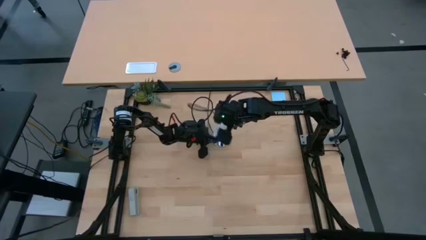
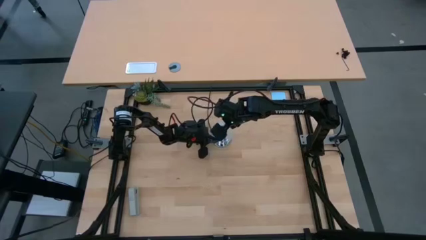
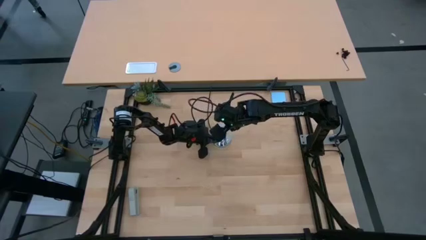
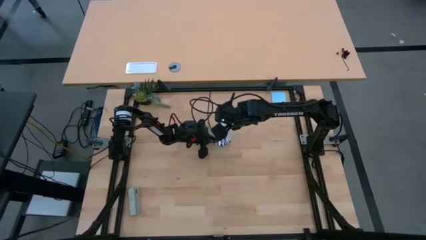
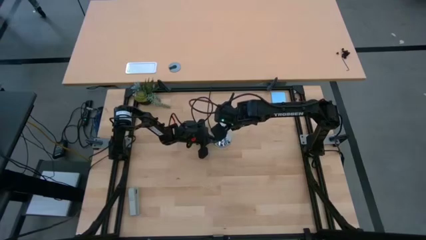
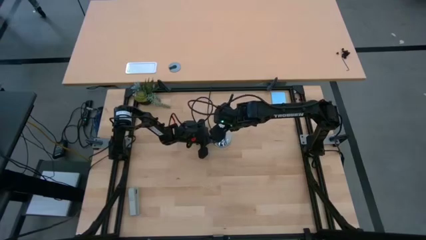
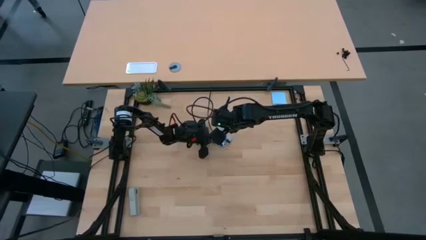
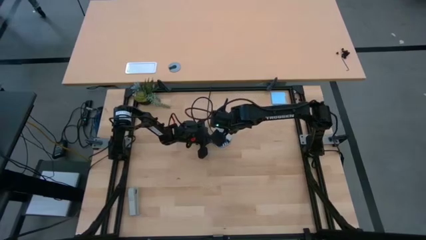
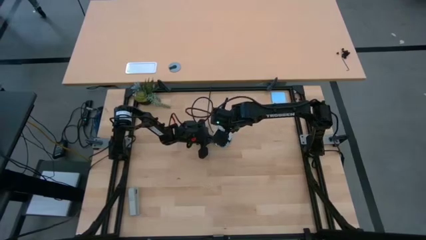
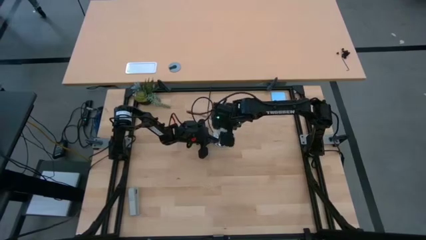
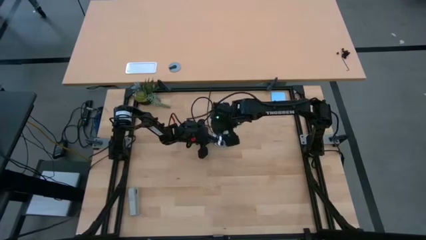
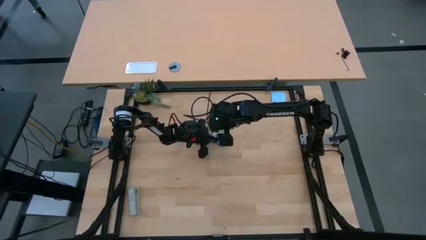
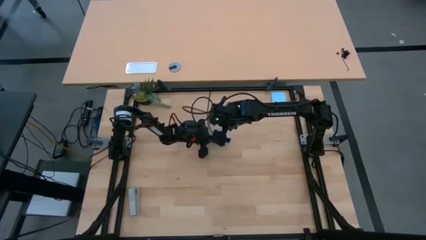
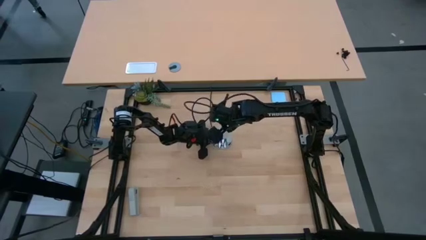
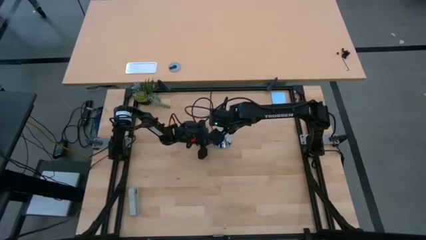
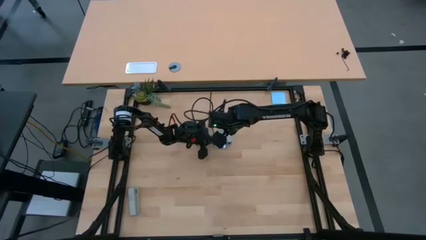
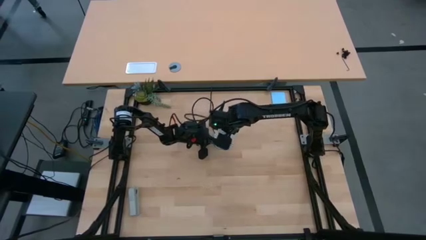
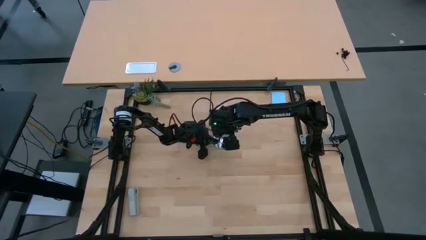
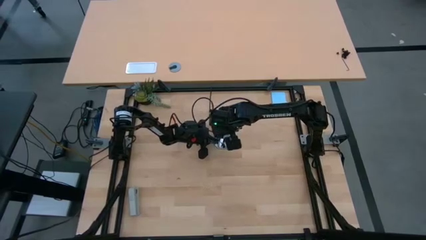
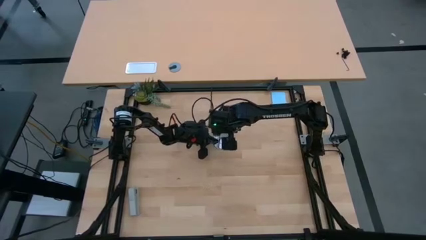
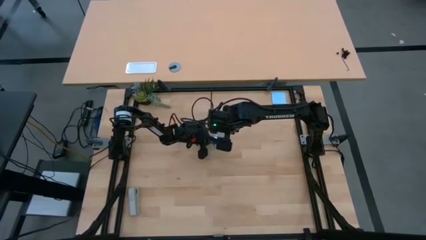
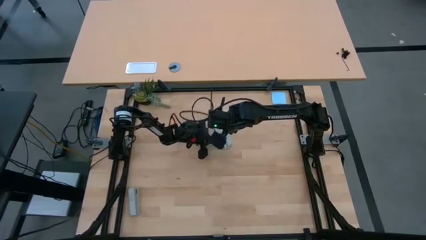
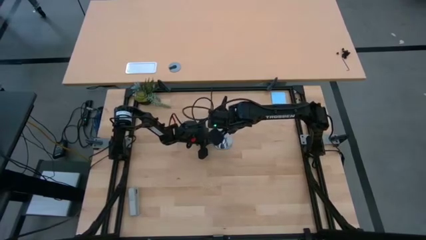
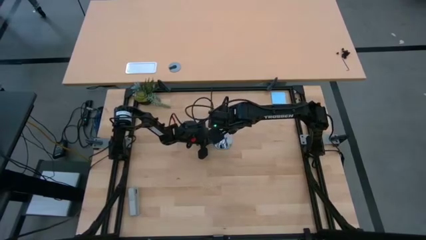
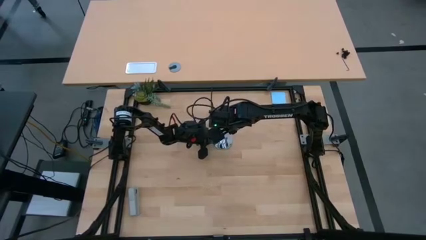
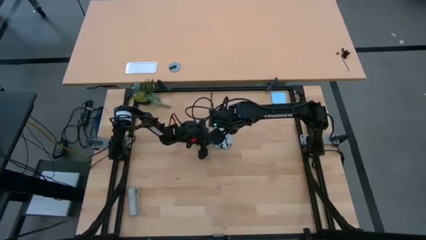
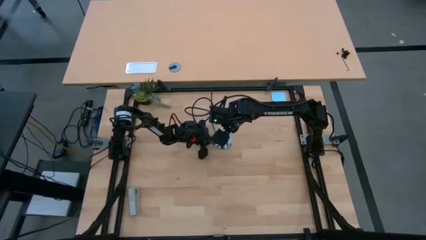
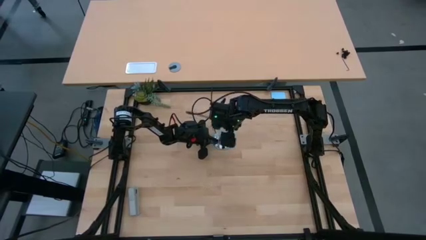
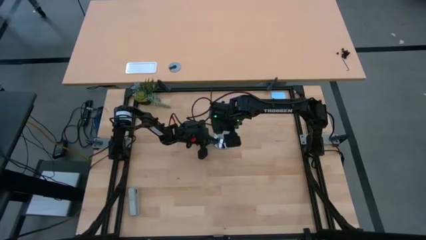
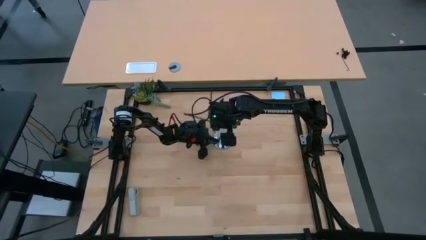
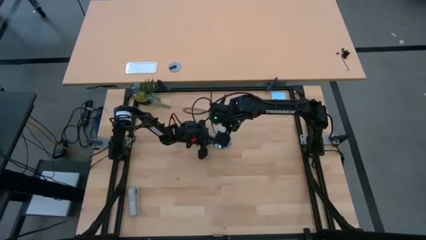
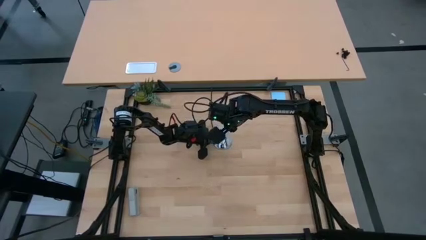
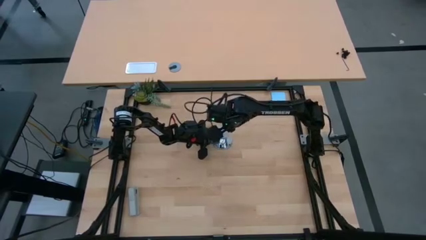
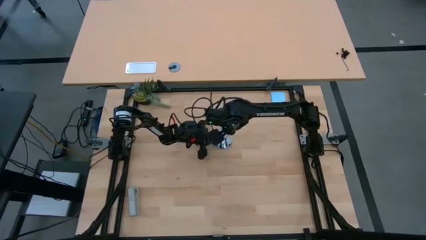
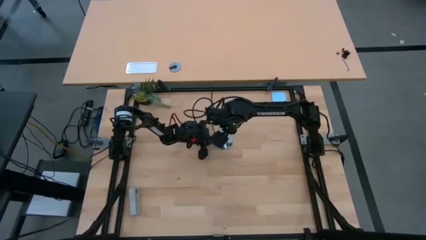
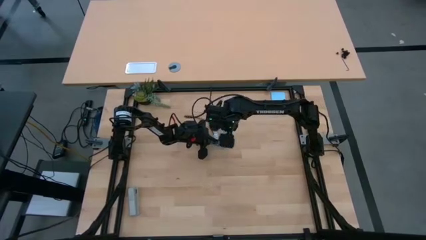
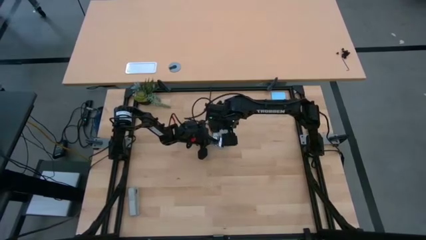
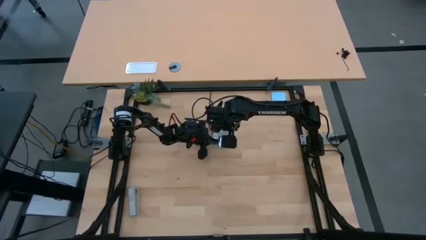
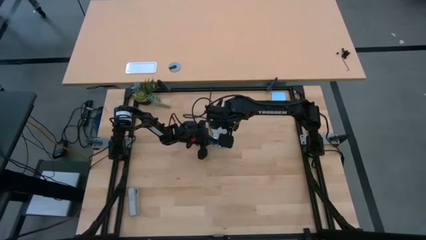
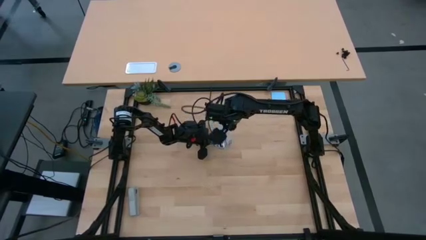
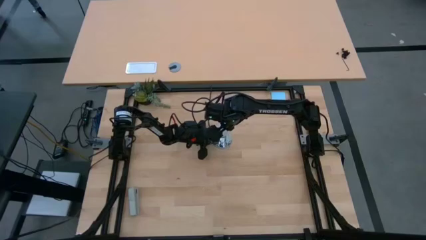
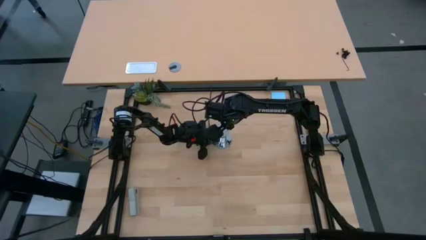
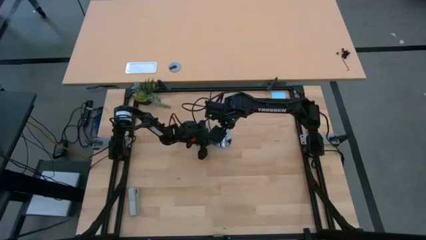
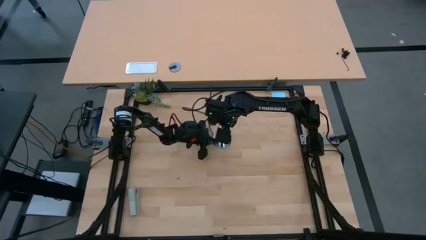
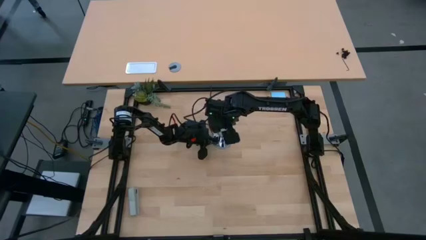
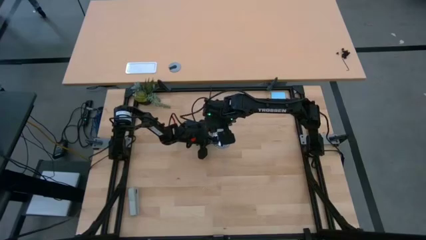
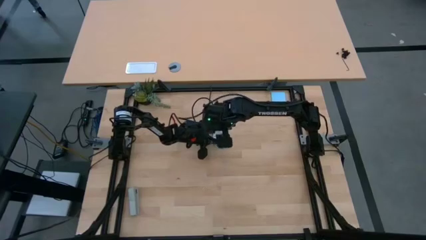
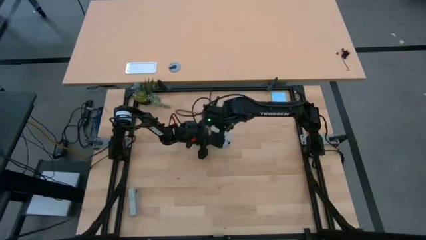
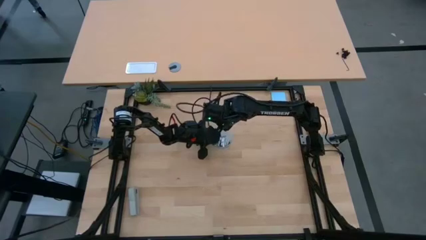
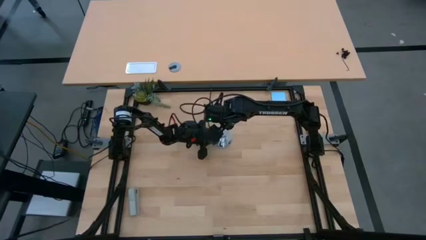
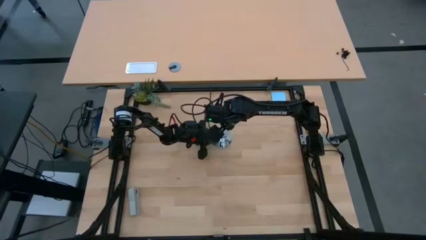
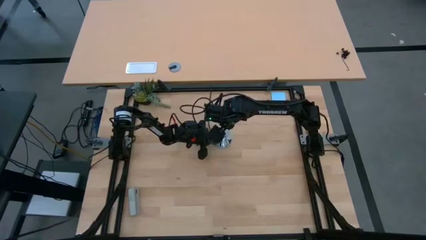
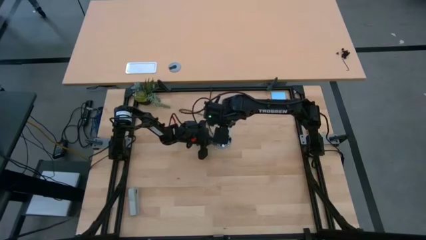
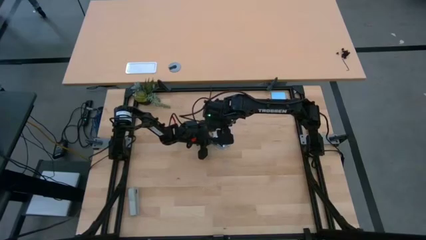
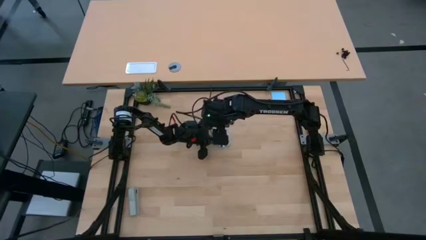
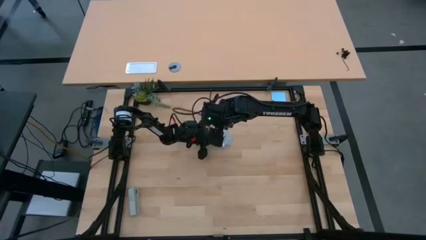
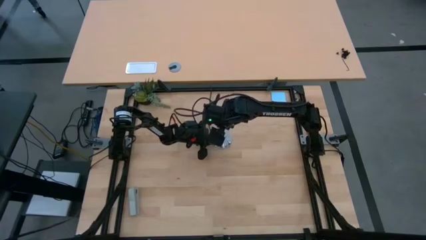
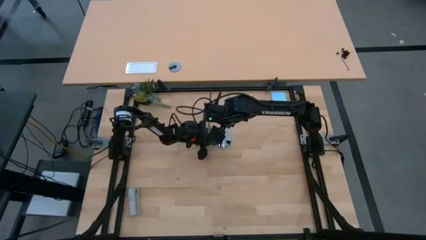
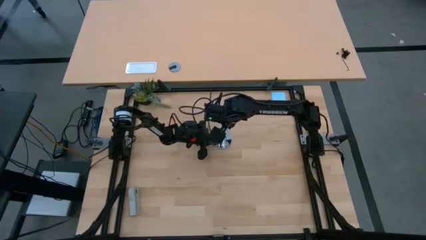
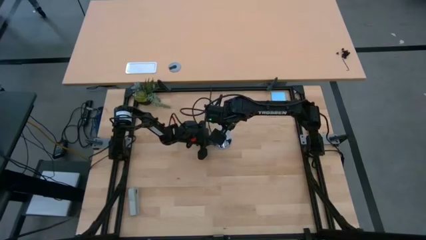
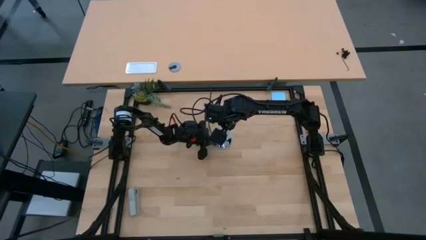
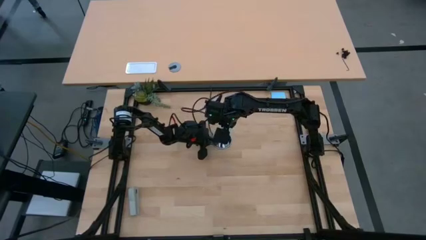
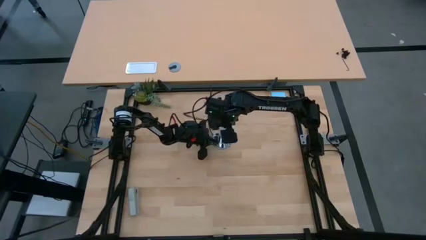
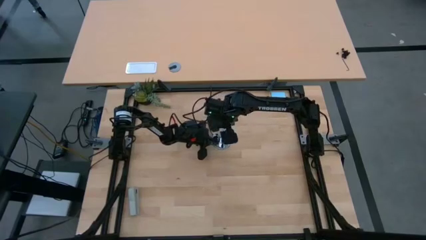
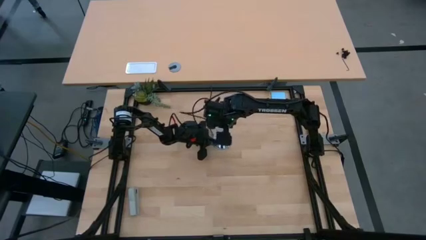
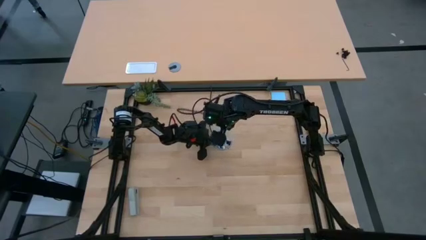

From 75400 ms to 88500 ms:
Task: Screw lightbulb
Remove the white lightbulb from the silver lamp
